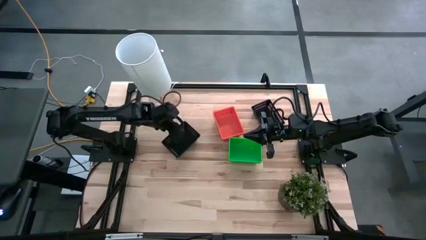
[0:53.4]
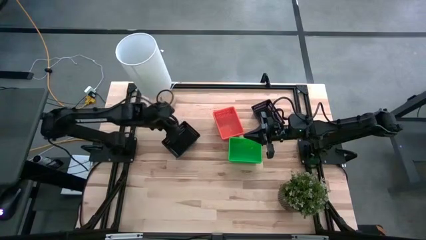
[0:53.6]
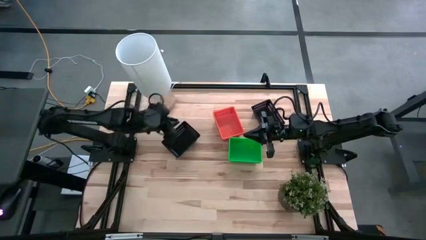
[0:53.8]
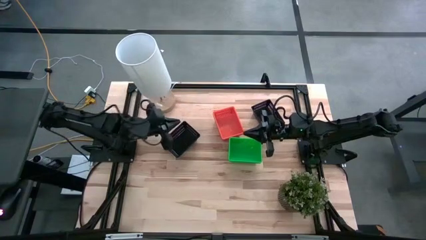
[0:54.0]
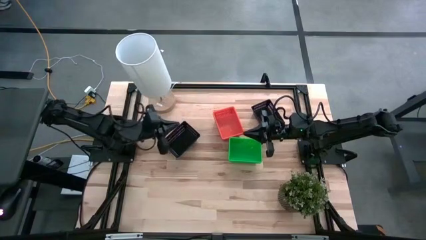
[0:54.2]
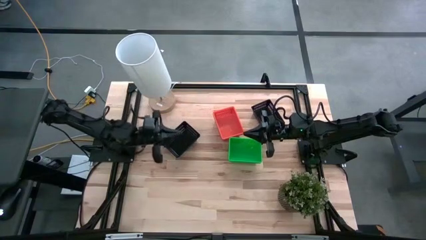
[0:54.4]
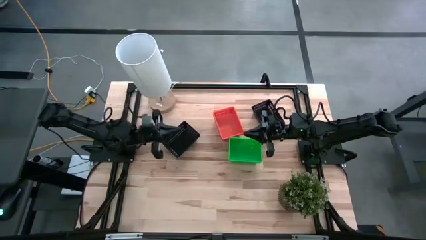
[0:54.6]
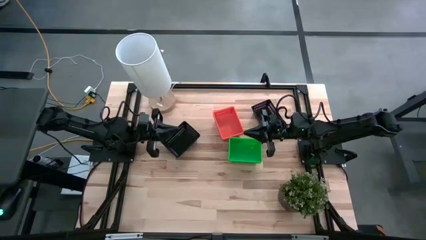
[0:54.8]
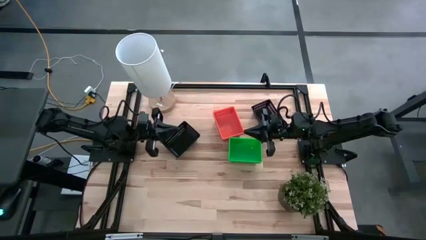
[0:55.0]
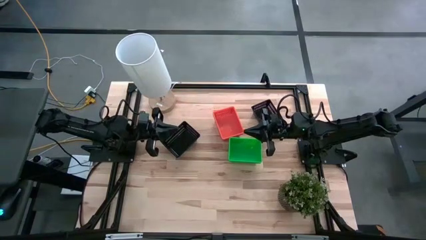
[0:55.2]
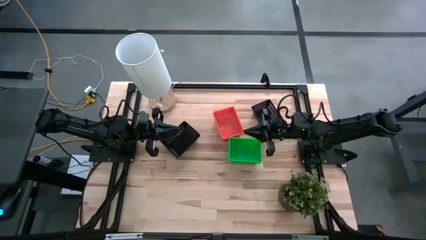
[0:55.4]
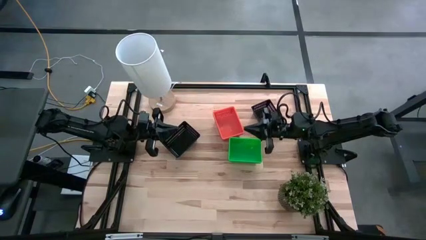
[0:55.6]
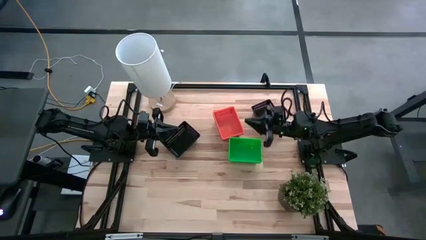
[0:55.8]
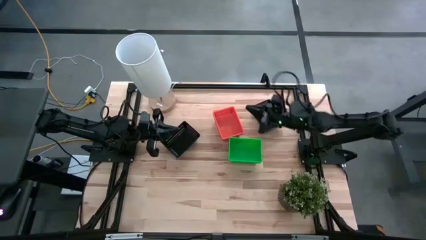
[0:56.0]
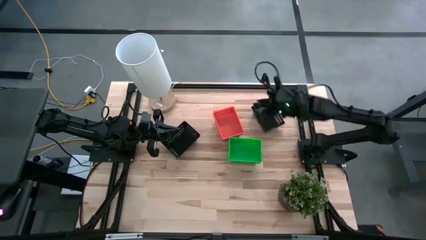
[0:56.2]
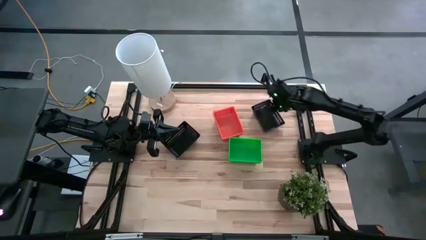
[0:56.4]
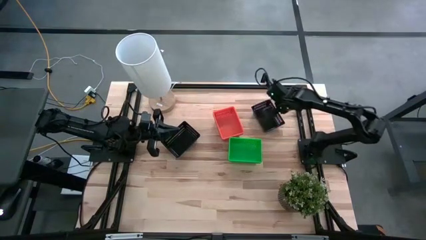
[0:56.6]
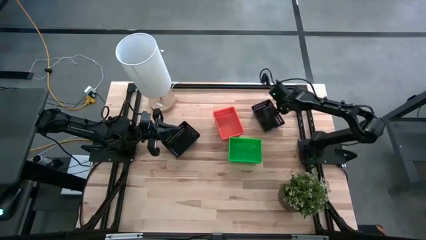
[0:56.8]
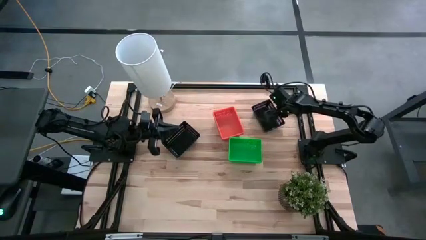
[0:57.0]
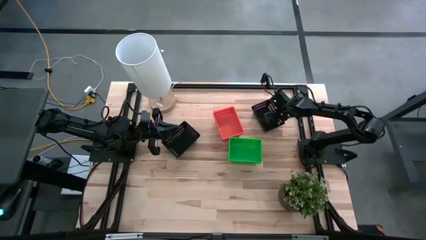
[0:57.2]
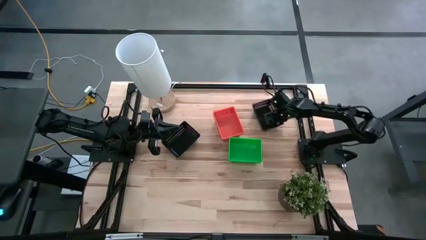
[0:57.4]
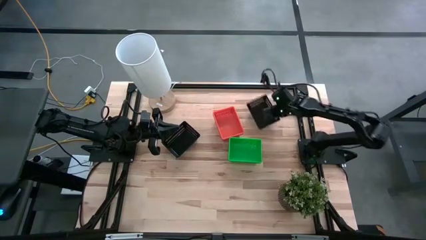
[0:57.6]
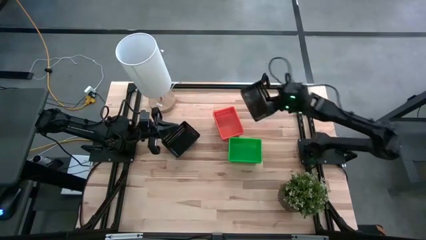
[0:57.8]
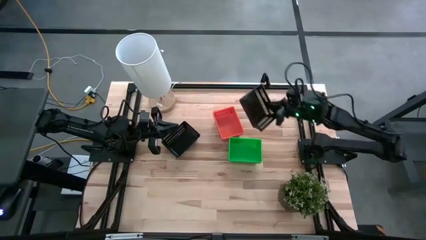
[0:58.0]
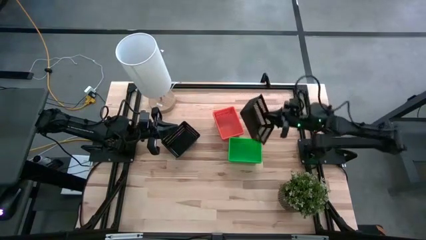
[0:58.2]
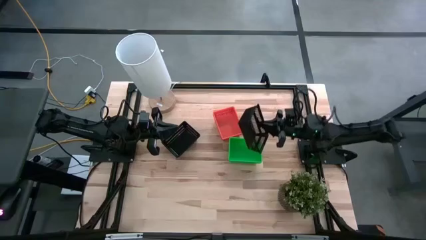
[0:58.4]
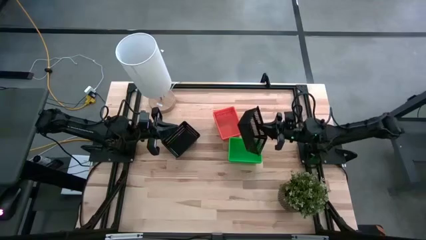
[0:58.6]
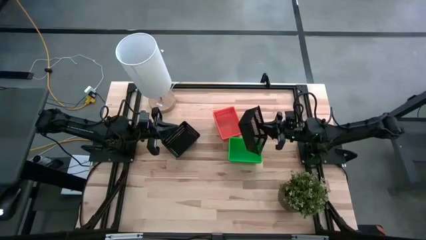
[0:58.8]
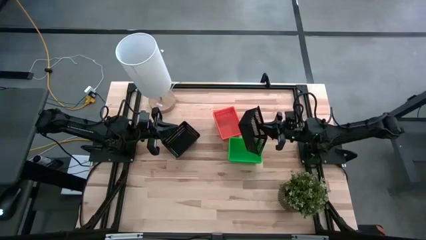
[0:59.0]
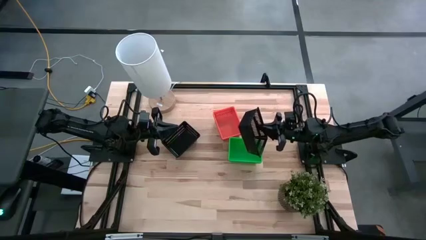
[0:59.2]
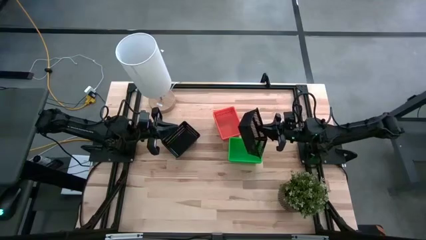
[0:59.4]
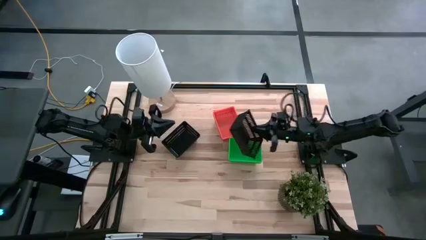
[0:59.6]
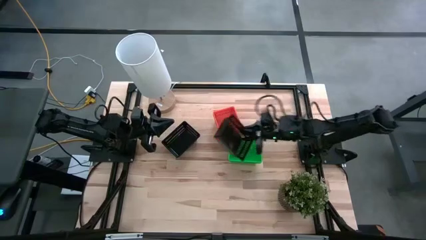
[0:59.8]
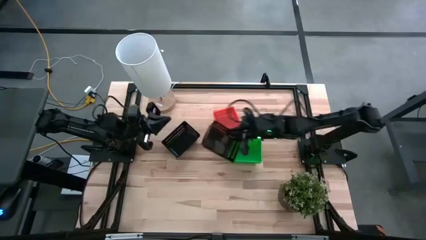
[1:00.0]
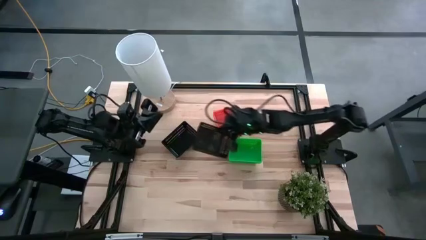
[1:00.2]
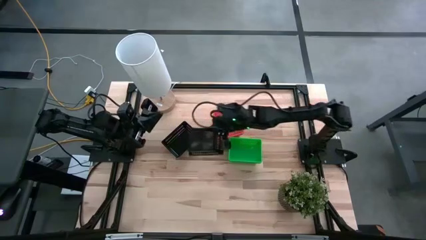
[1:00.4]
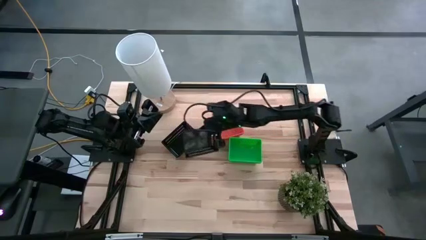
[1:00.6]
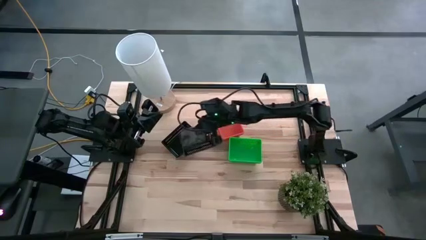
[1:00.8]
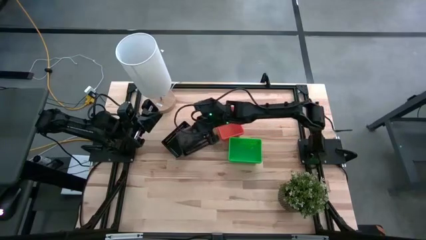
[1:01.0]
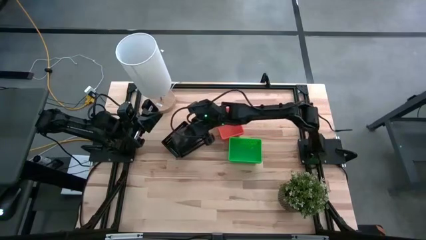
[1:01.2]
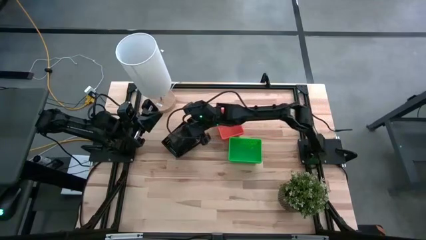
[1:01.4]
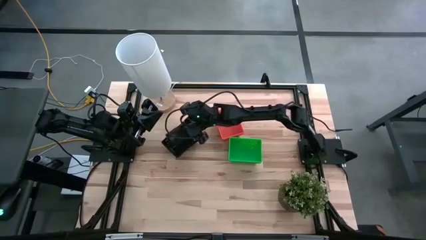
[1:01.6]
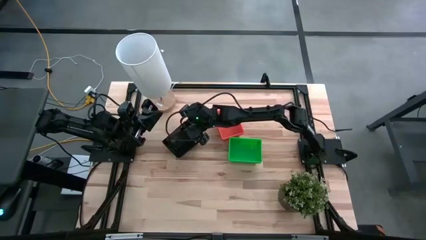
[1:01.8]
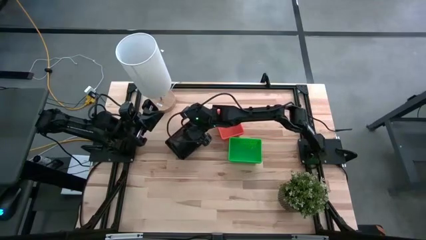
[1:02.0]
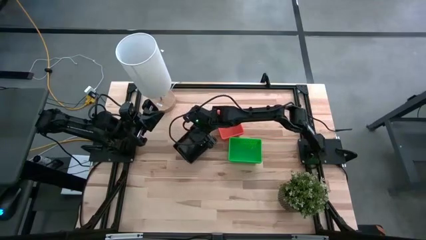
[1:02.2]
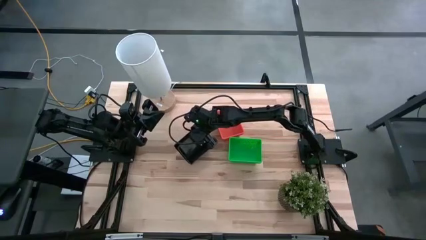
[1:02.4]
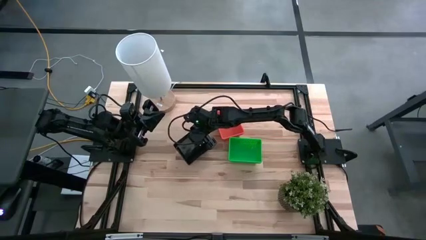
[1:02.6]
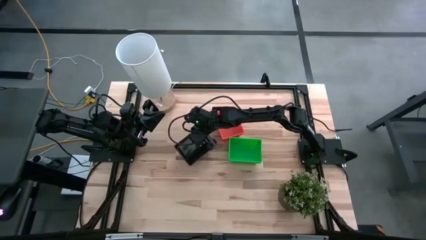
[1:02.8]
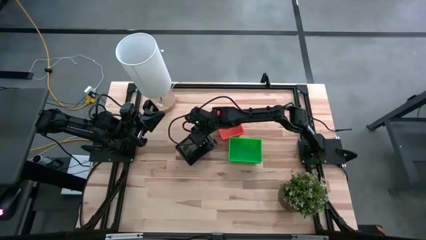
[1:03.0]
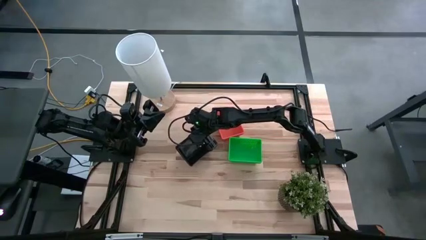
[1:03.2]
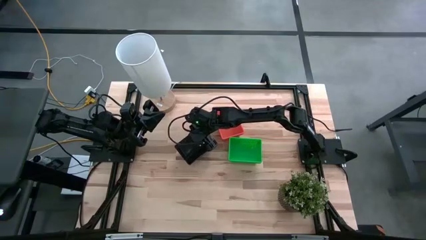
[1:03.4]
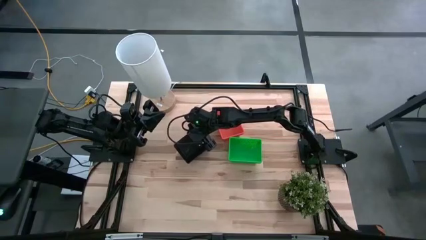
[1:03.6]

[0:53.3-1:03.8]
Stack the right black bin on top of the top left black bin

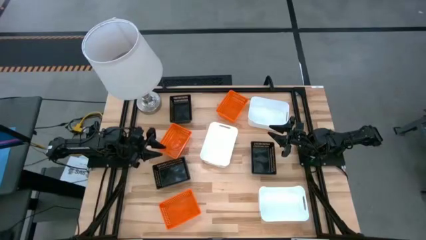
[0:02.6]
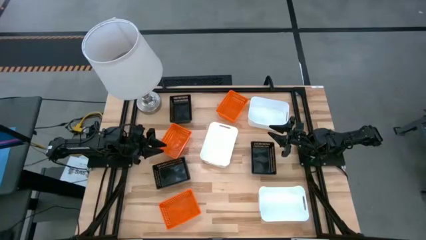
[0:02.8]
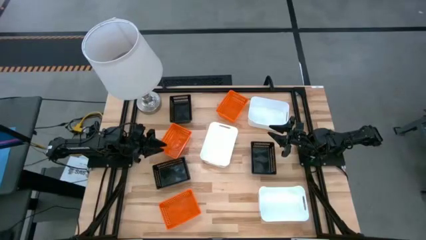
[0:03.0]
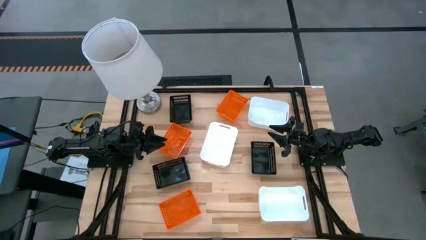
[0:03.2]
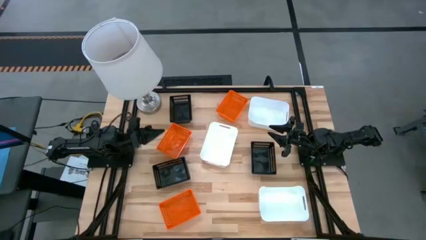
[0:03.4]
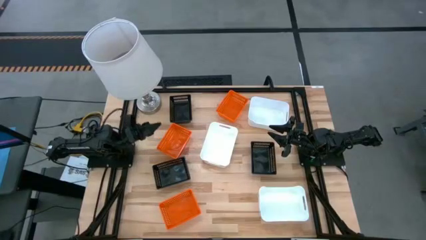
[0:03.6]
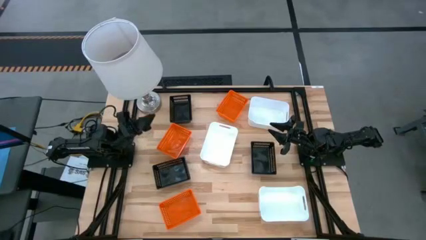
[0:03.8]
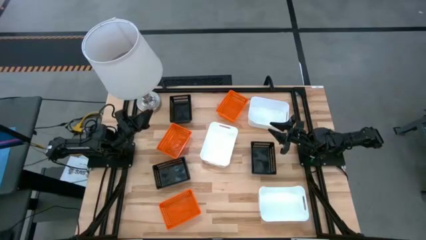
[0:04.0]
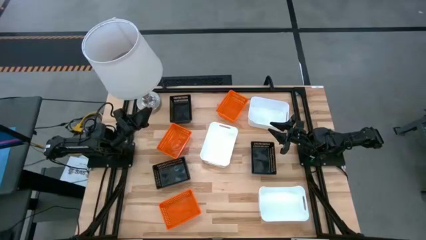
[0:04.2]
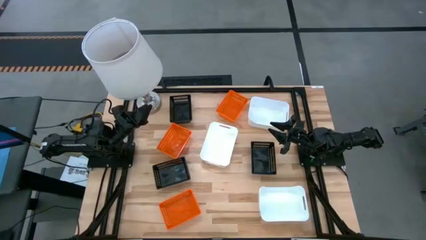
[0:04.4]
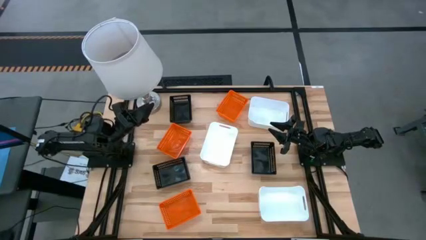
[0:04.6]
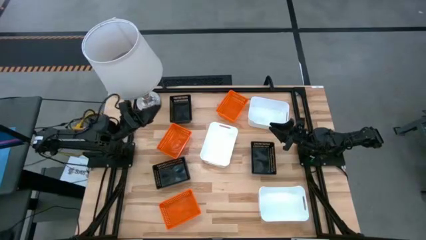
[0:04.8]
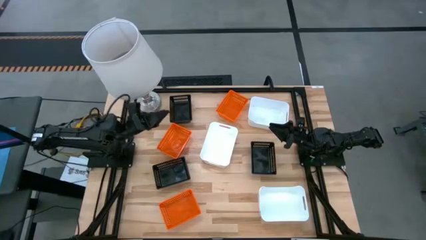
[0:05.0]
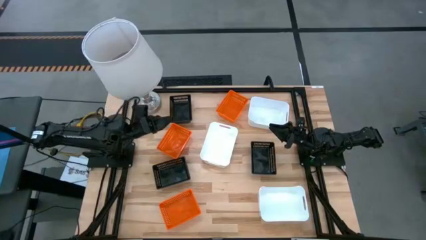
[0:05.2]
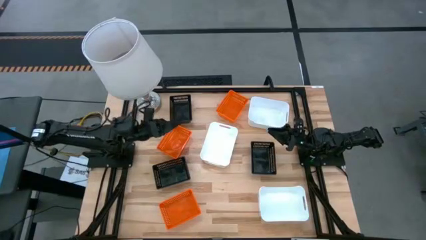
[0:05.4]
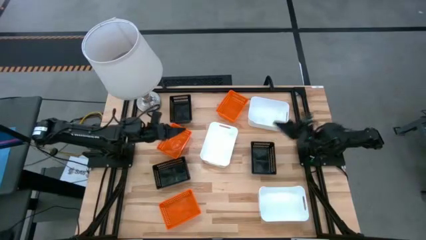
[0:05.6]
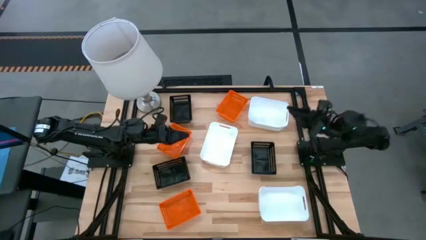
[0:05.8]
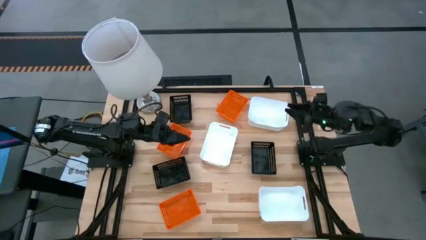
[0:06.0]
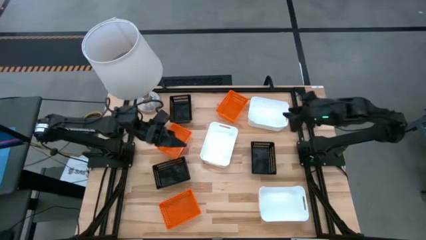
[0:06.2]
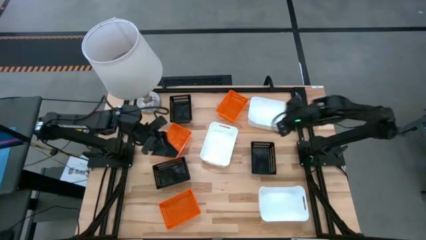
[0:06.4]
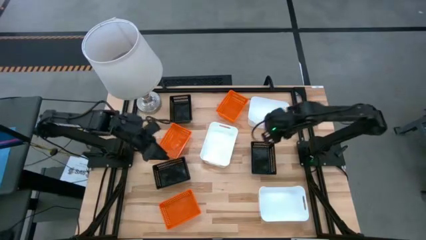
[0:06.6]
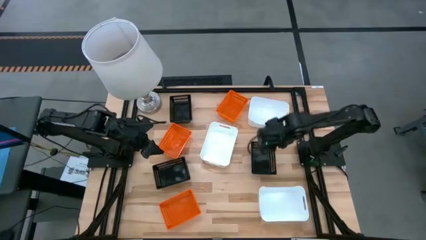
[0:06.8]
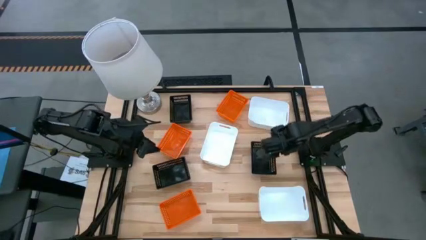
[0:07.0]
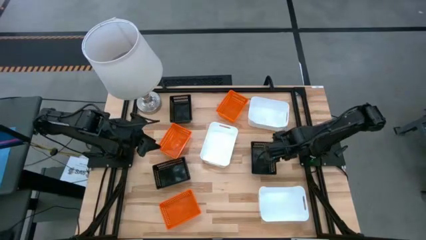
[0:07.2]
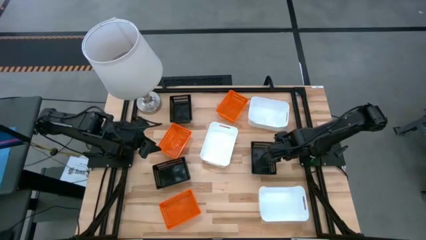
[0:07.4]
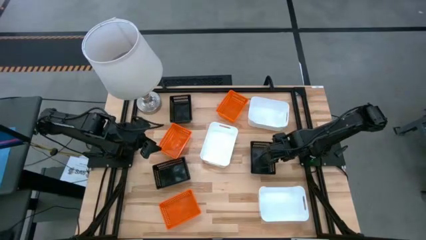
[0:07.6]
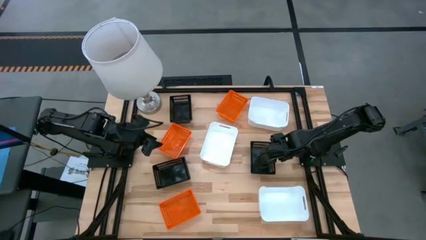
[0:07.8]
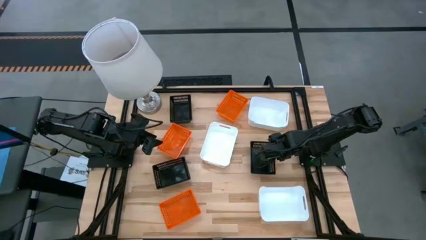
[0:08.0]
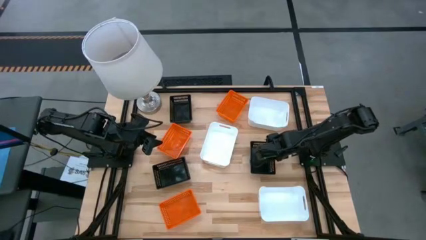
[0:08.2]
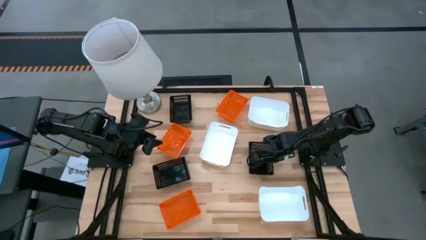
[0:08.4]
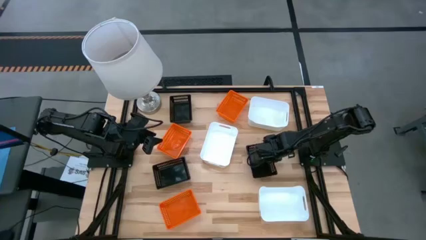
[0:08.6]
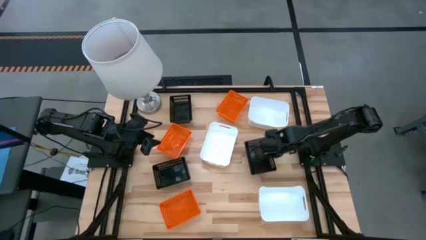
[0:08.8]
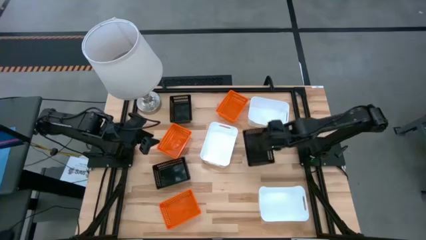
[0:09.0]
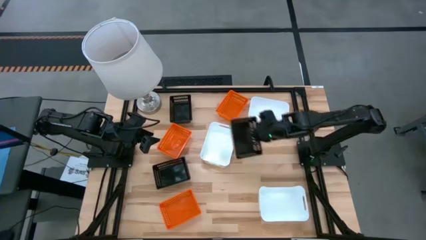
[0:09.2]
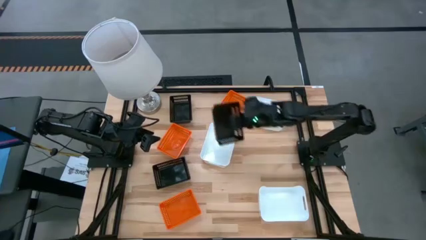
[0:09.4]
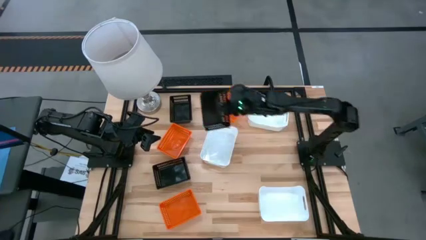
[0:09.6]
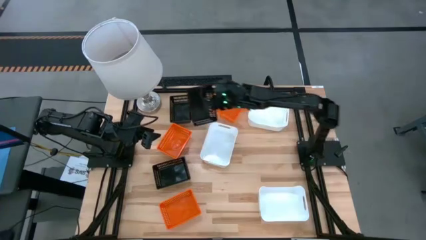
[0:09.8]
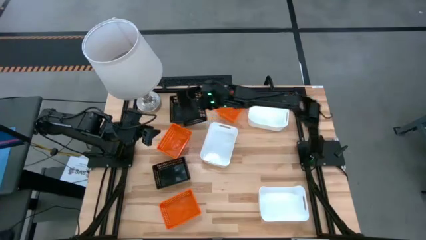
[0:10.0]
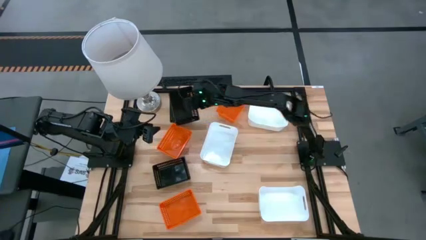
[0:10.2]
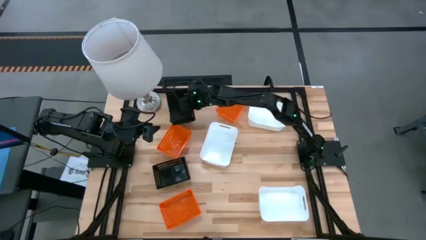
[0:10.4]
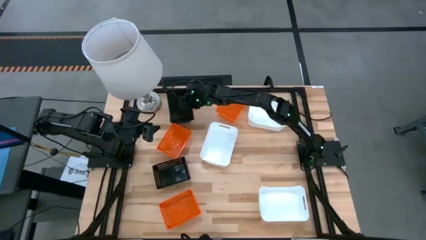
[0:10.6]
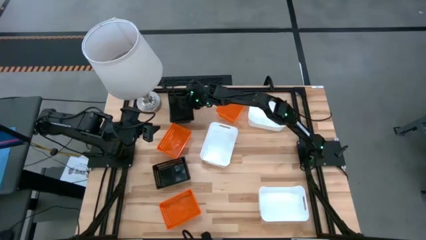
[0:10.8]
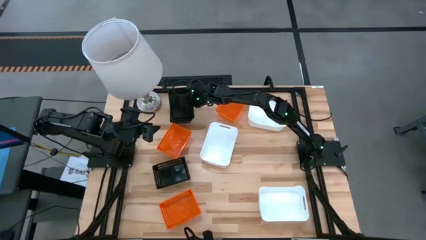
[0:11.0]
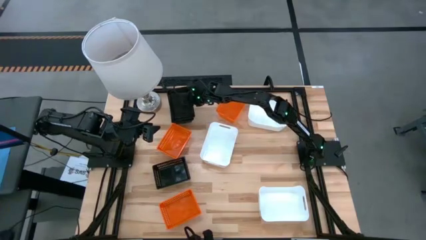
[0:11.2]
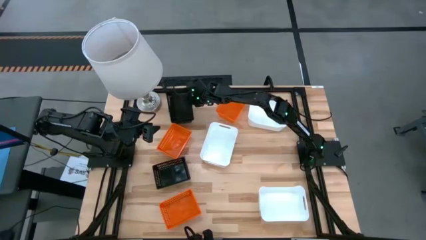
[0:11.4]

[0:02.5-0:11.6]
Stack the bottom right black bin on top of the top black bin
